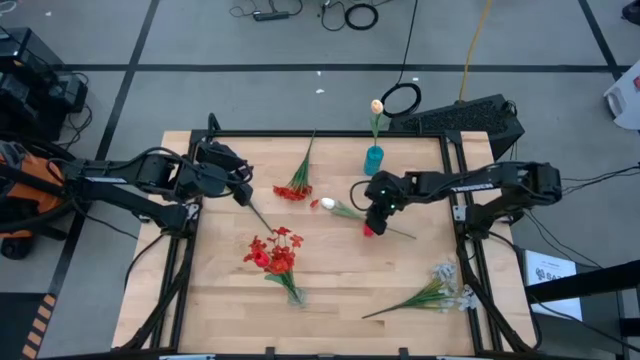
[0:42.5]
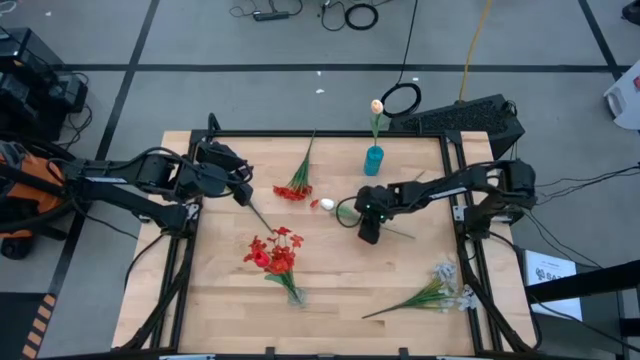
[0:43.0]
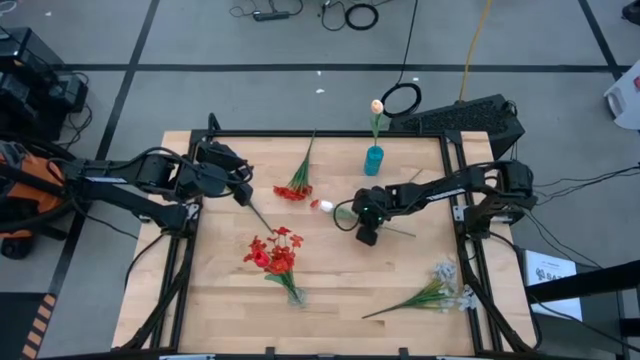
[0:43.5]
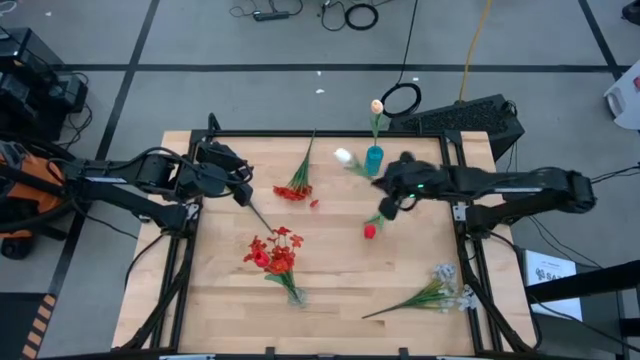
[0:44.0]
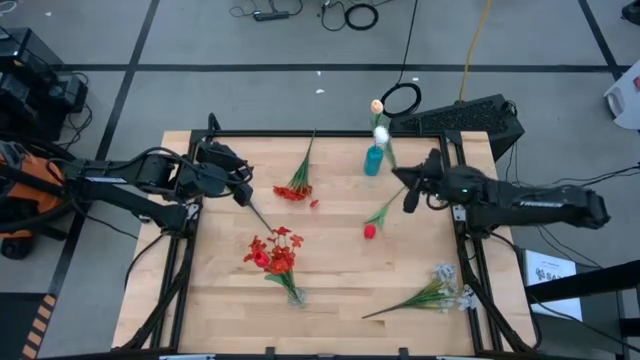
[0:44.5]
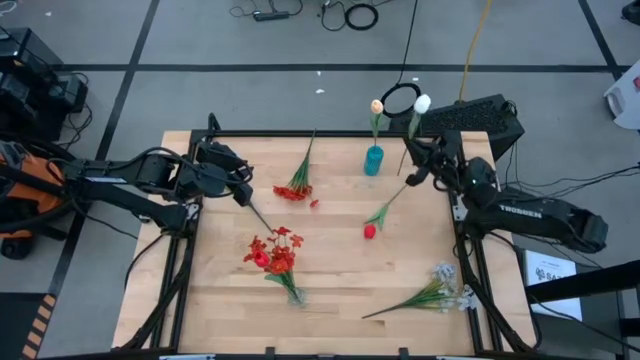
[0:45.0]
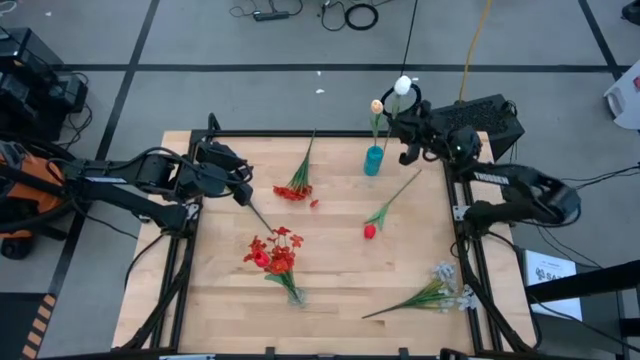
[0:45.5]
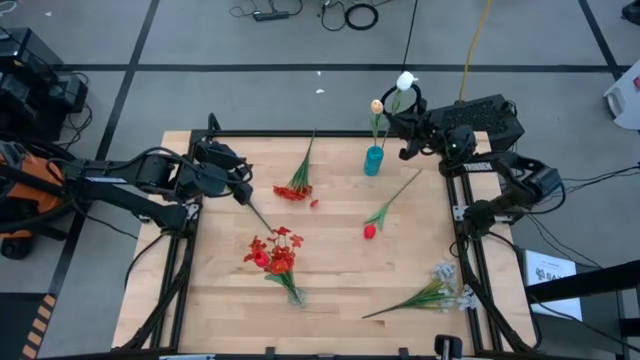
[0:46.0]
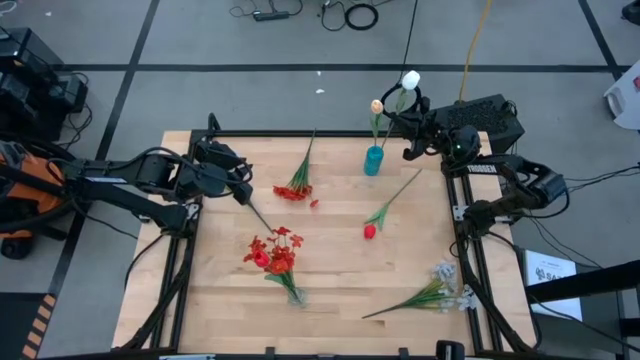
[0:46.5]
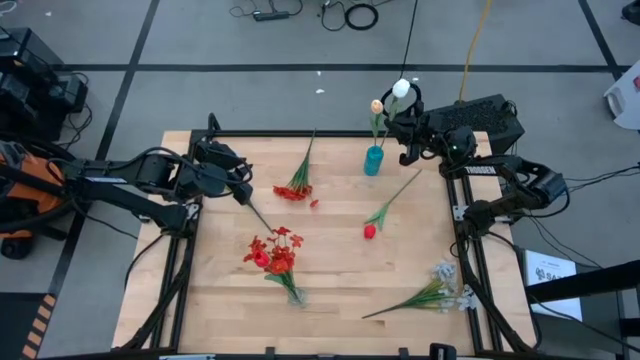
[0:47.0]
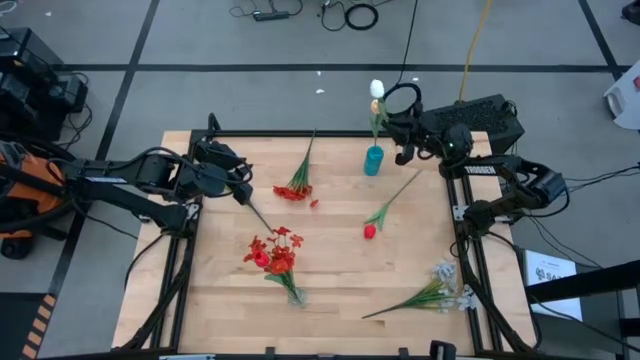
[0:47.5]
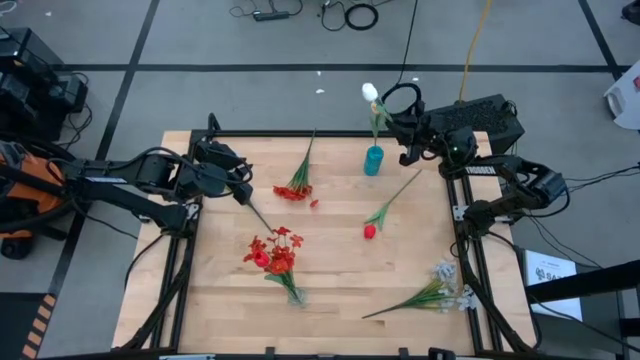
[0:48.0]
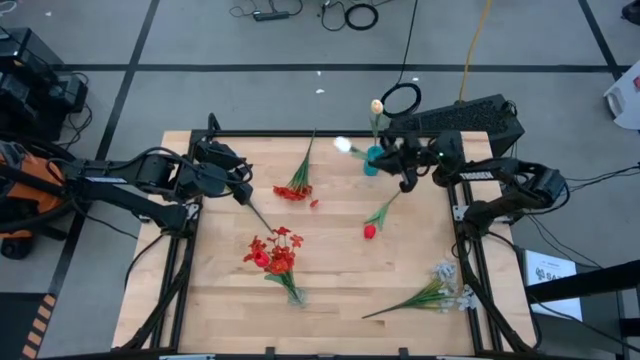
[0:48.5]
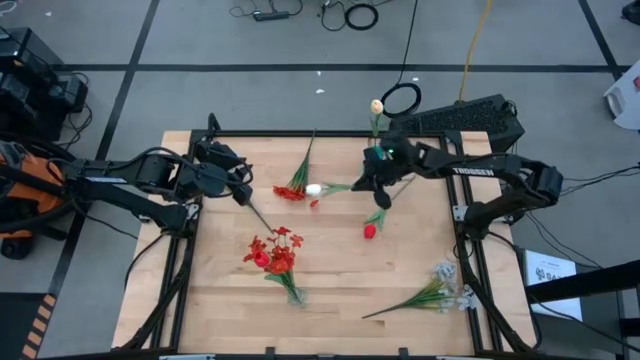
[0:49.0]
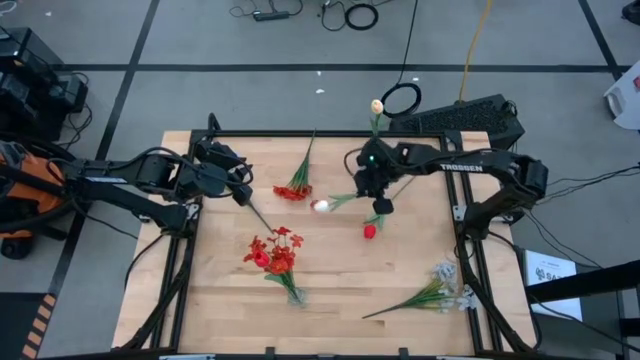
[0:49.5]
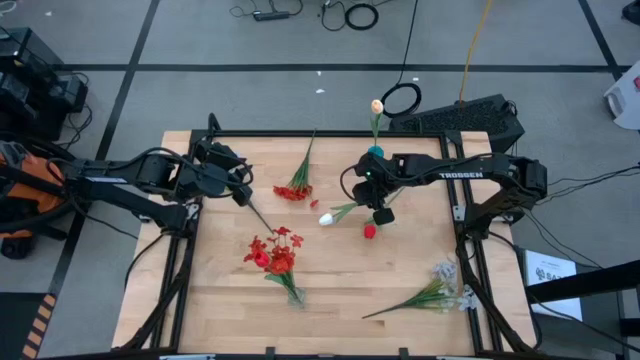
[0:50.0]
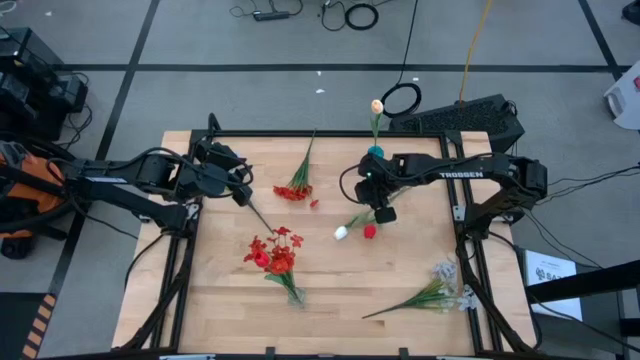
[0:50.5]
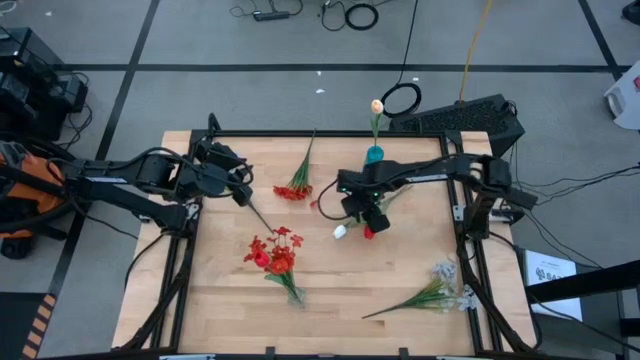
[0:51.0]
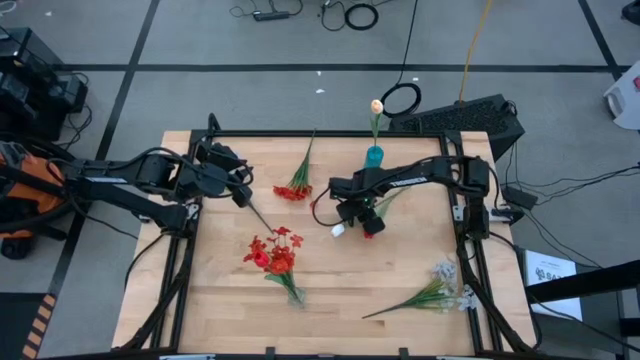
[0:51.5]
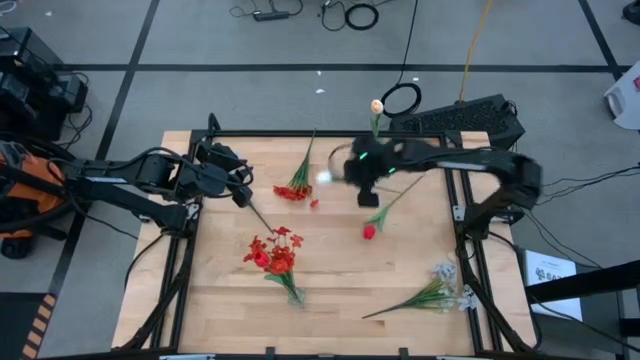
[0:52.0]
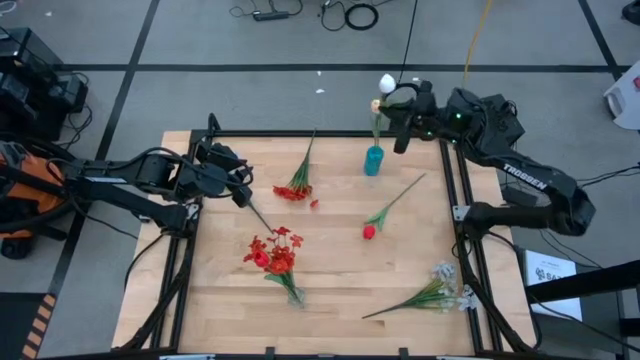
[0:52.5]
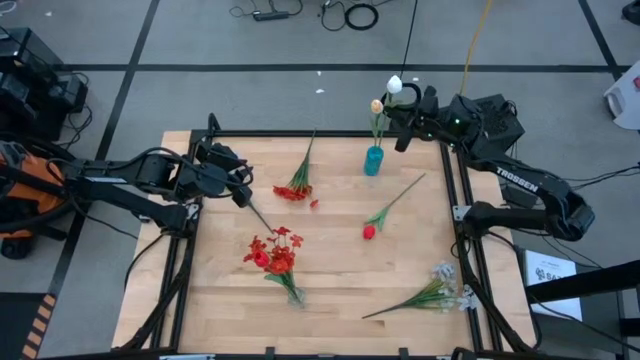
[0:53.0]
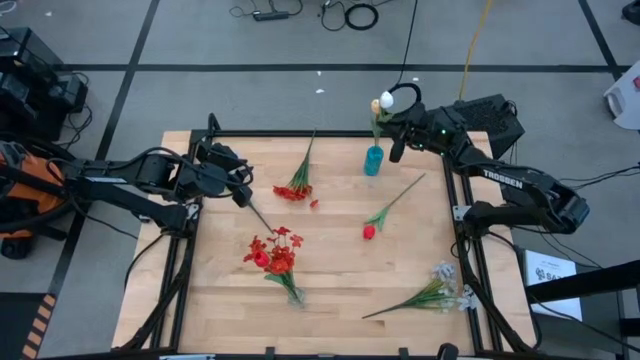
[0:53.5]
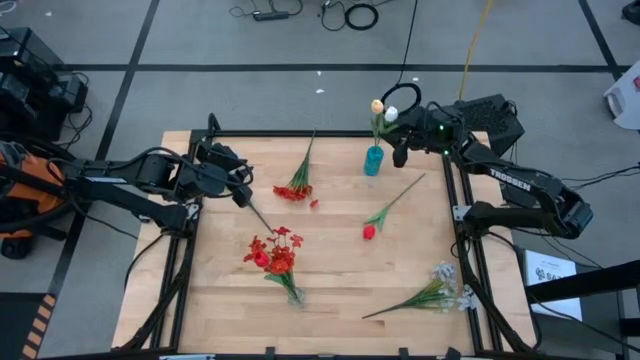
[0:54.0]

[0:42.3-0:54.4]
Task: Sort flowers into vase by color
Put the white flower into the blue vase

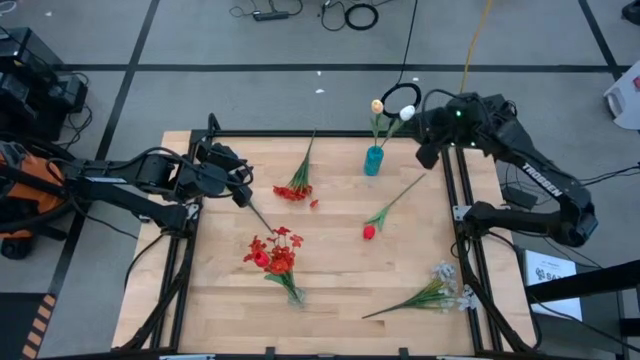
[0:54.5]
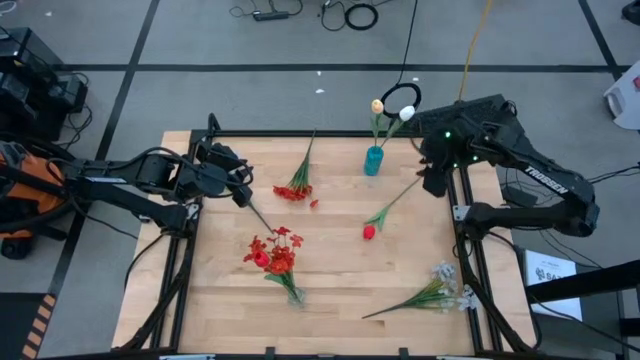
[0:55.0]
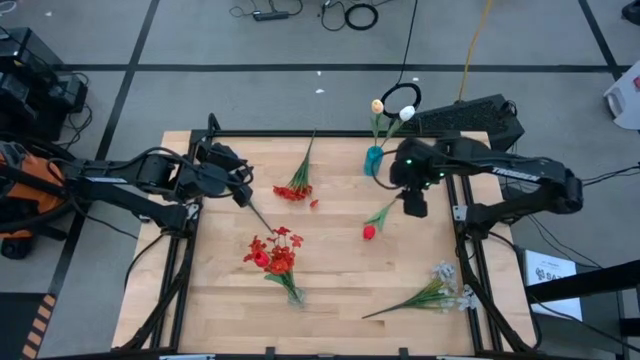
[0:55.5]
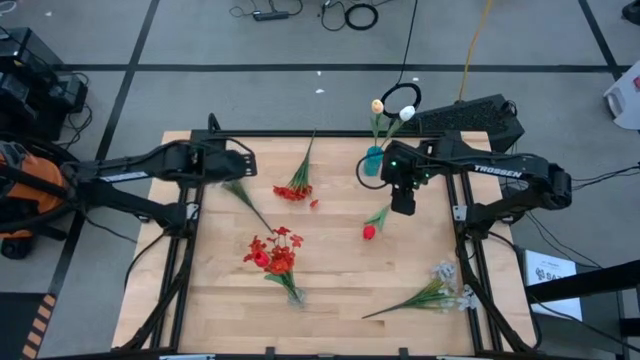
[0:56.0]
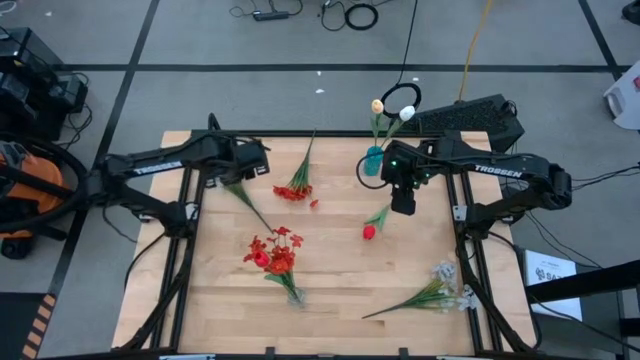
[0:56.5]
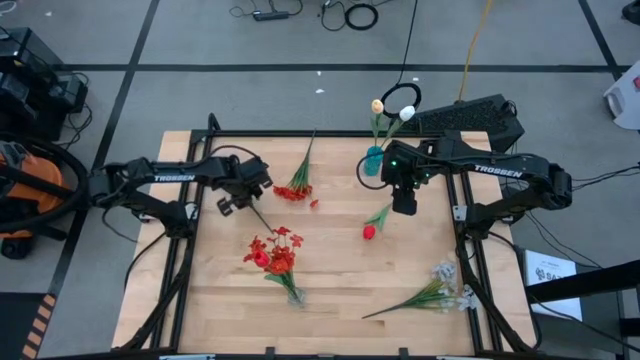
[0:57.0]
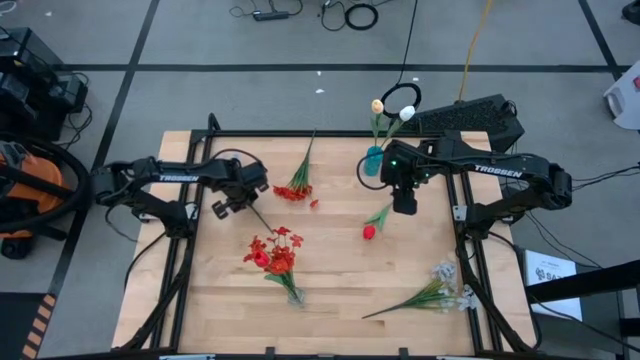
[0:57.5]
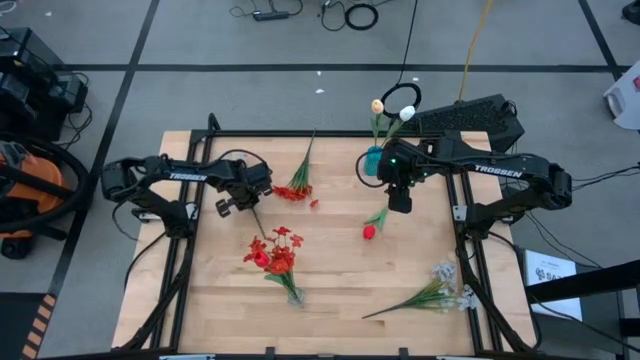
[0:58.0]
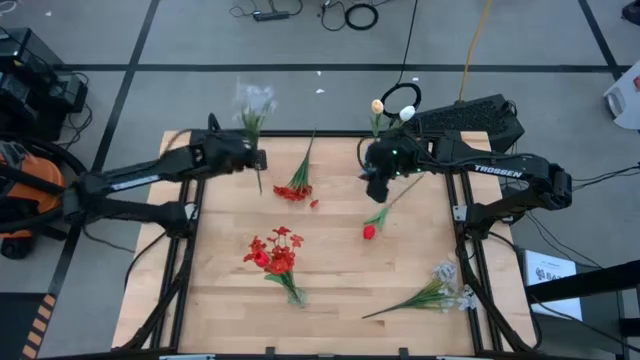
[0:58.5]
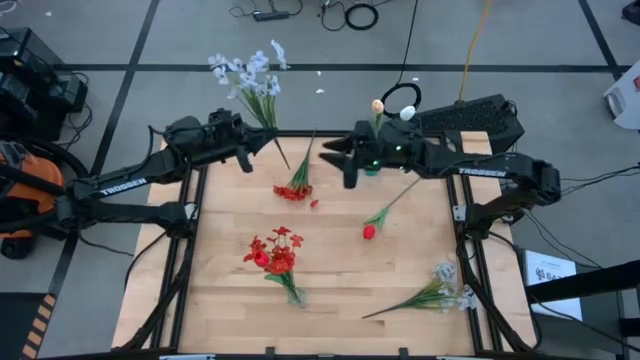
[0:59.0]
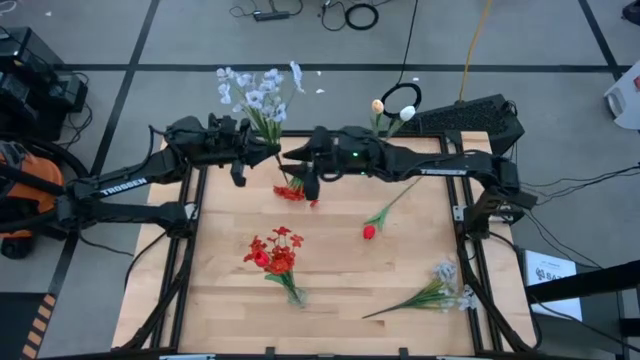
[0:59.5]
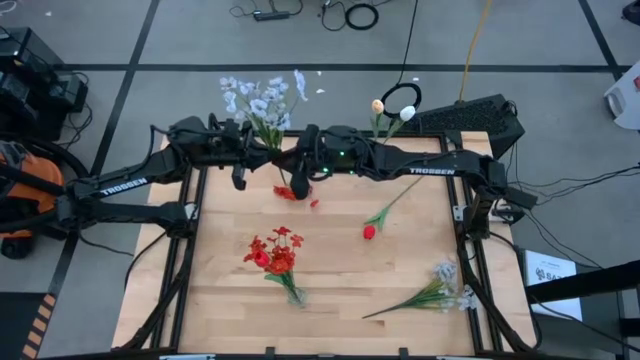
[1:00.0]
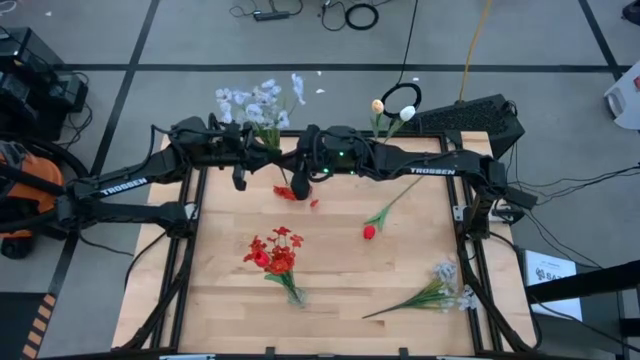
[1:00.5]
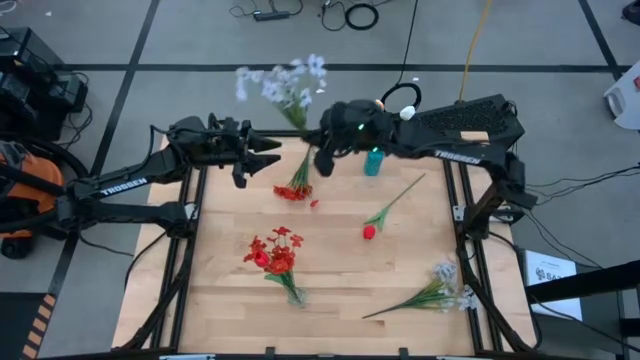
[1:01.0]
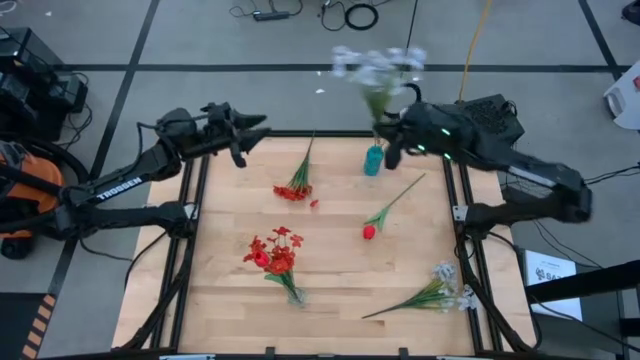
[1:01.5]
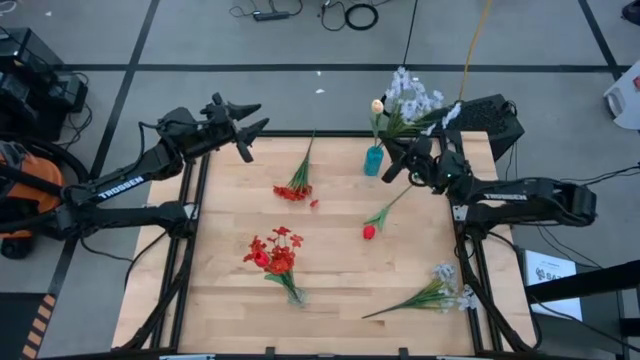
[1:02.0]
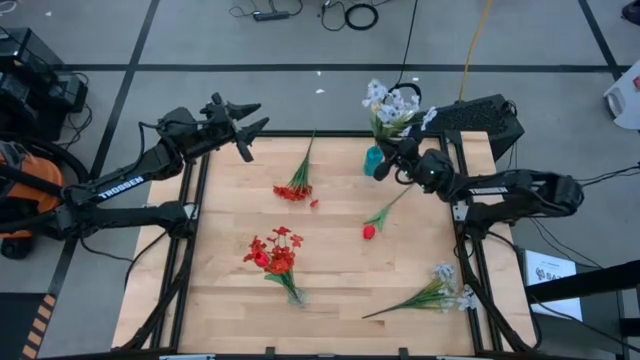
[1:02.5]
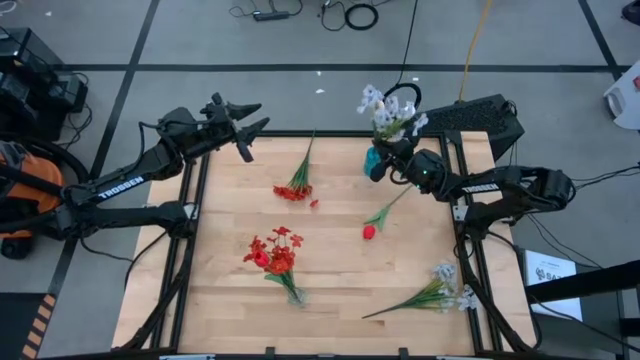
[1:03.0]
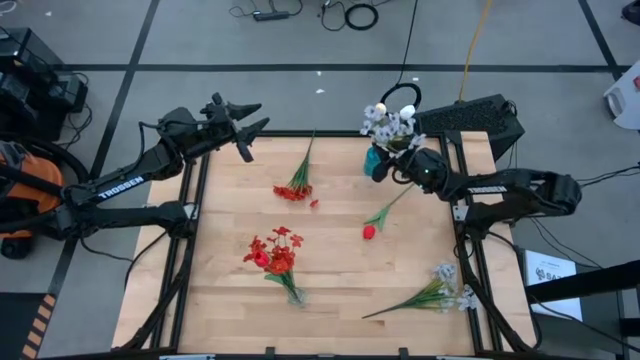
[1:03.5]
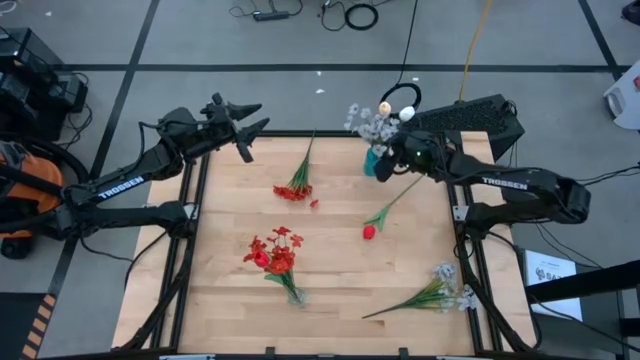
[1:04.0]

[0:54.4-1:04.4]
Put the top white flowers into the blue vase
